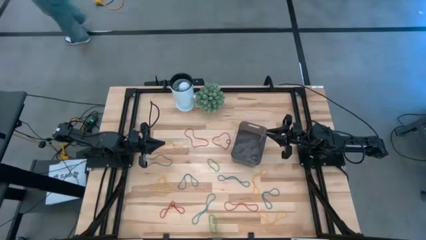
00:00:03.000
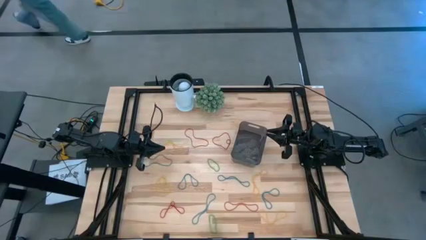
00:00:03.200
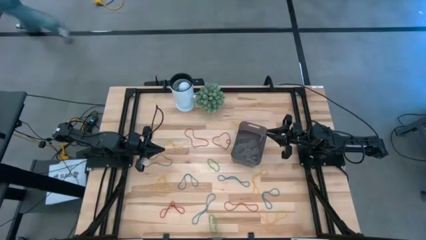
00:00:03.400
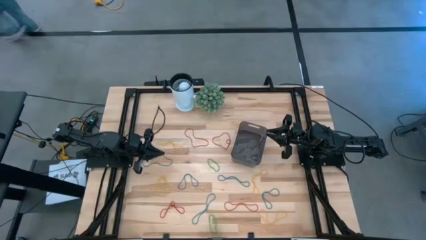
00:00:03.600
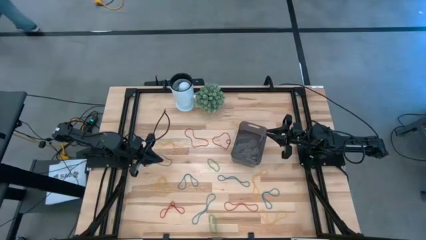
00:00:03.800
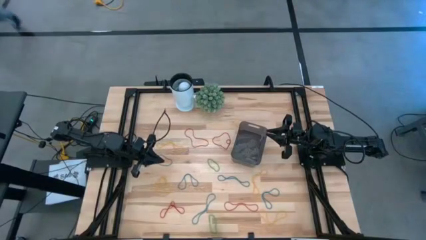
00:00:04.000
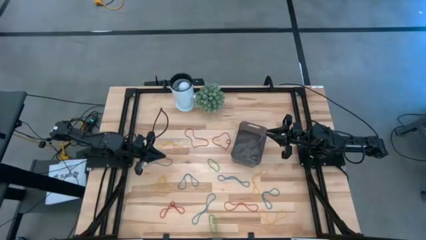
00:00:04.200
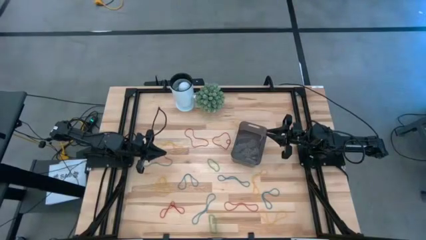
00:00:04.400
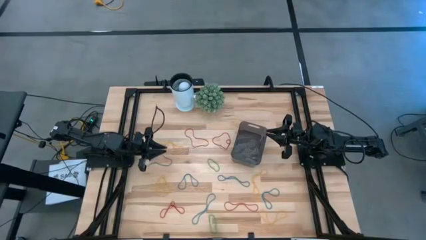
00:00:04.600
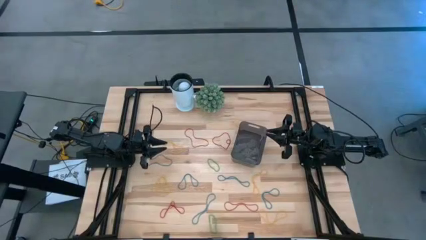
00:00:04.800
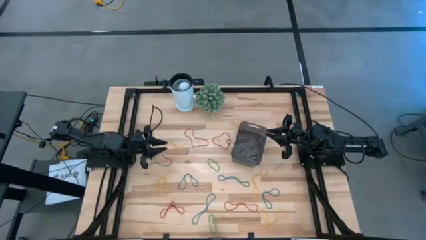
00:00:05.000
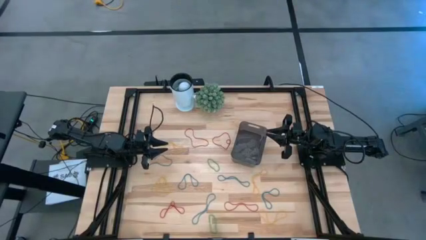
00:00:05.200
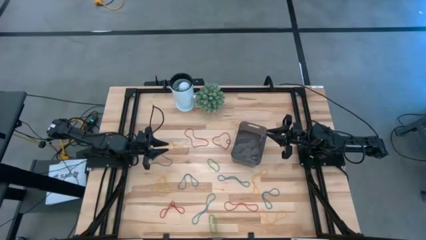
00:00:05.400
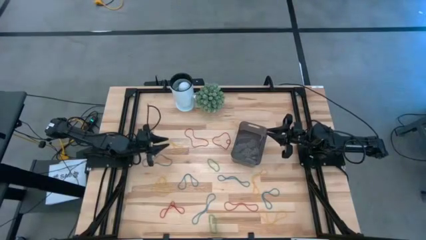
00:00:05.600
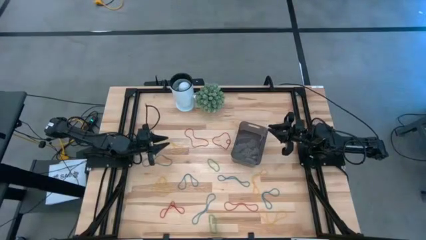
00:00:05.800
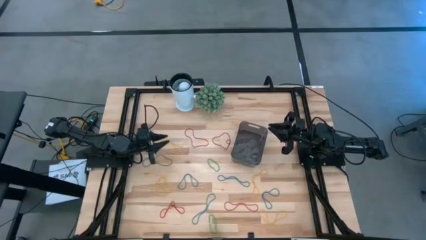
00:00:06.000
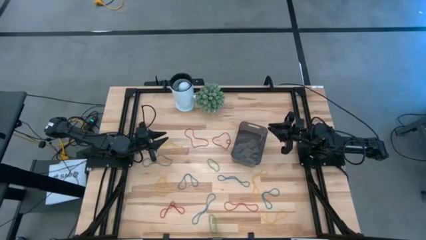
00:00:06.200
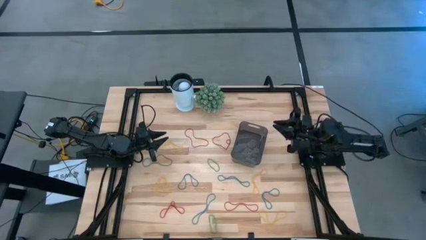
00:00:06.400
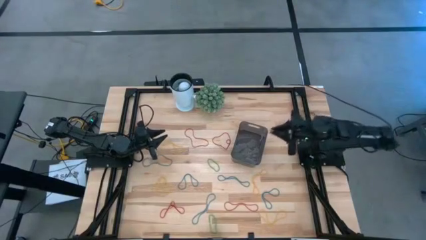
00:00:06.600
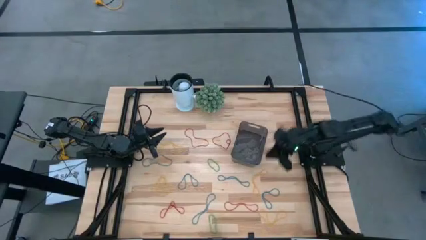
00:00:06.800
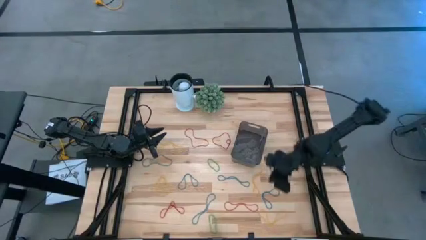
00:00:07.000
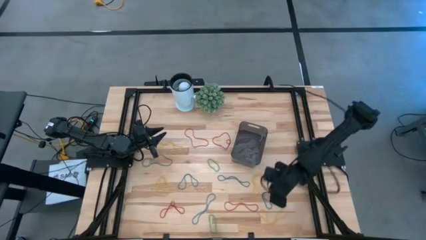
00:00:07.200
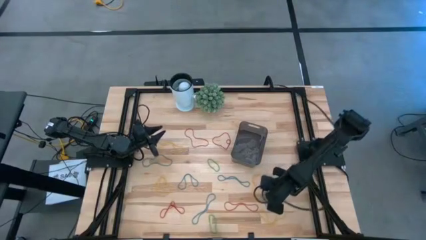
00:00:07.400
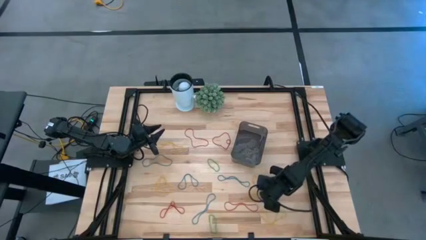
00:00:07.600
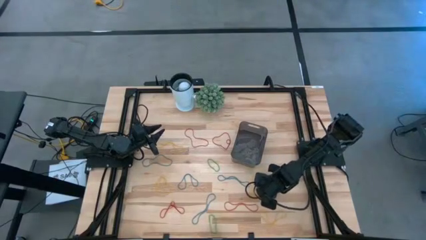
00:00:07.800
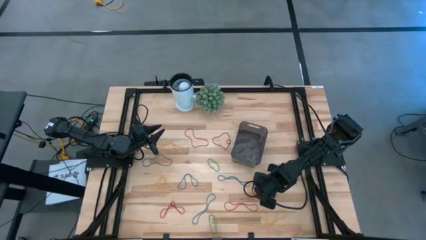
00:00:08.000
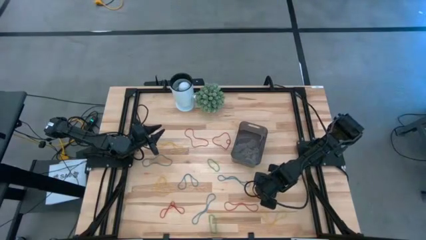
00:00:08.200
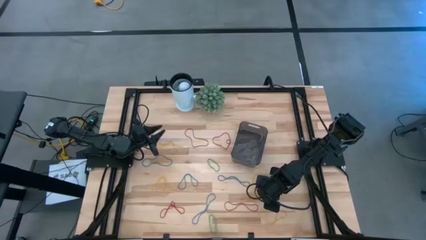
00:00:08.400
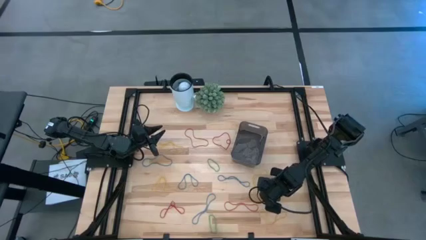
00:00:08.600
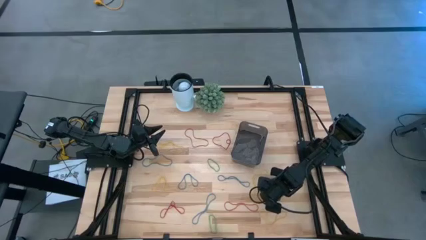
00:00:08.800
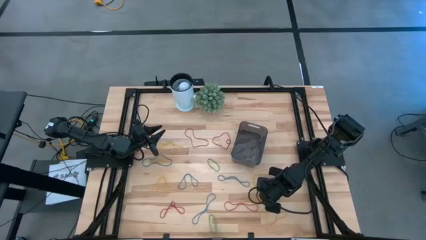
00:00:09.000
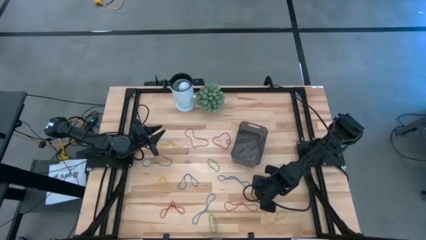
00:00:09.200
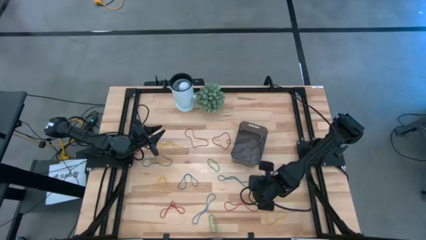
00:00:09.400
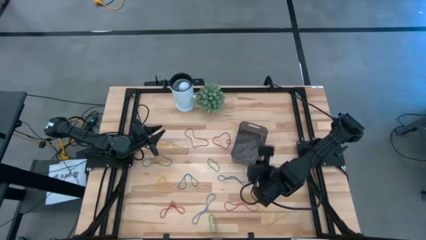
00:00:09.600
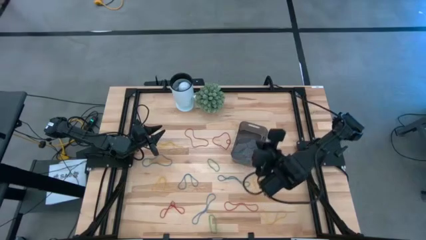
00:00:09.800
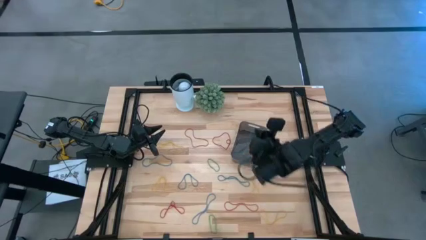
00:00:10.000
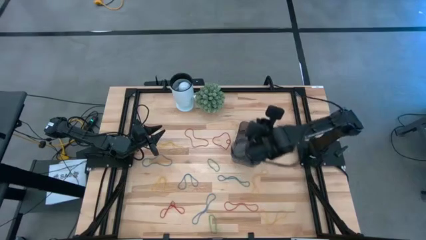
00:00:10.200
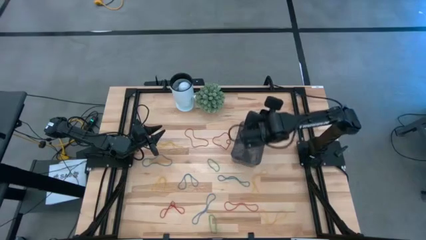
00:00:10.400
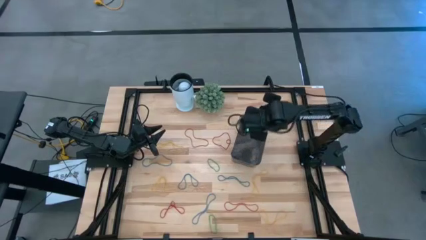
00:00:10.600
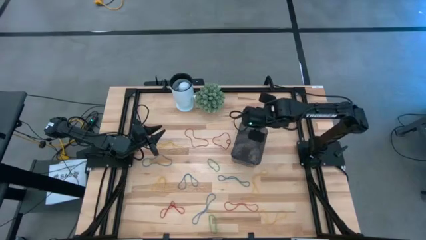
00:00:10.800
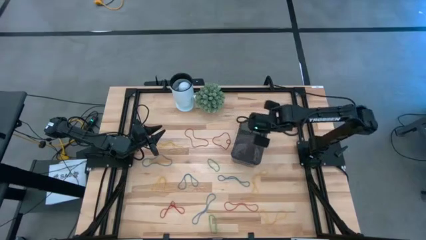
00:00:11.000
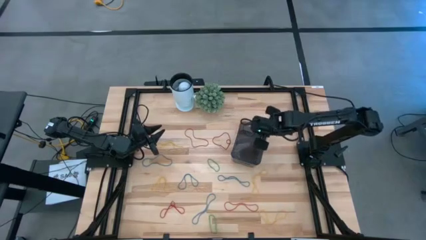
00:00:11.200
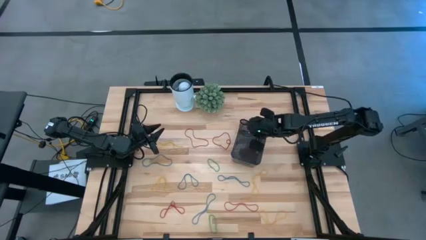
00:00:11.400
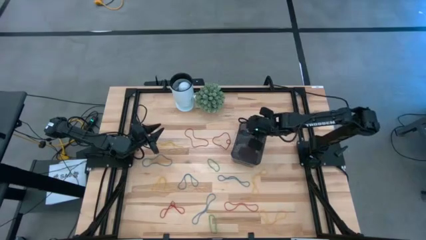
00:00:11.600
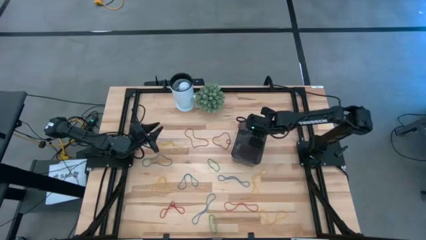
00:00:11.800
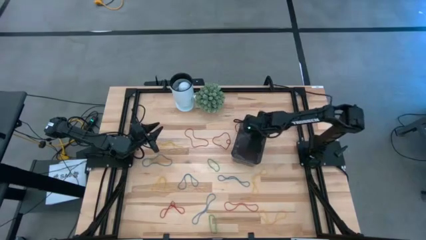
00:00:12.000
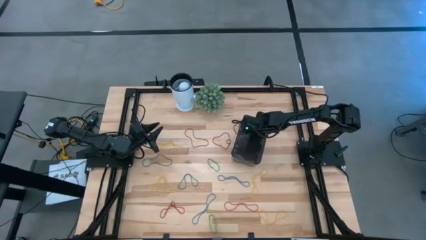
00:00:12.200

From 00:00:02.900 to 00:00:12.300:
Task: Pick and place items into bin
Put the blue rubber band into the black bin

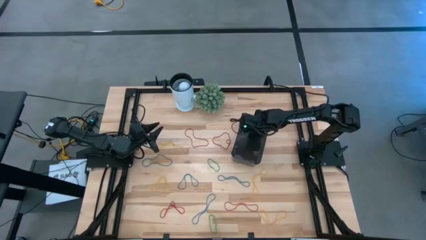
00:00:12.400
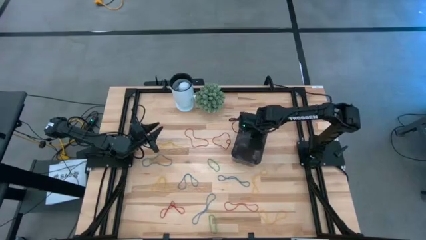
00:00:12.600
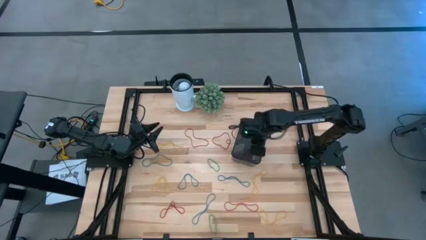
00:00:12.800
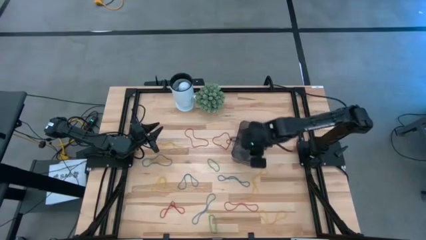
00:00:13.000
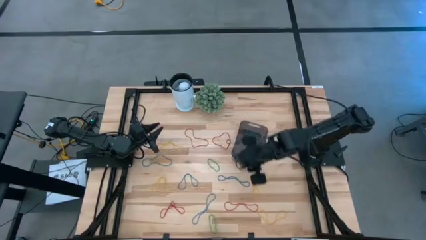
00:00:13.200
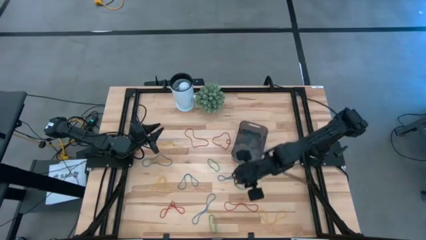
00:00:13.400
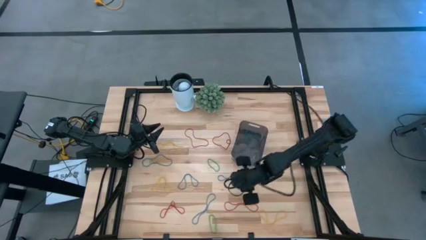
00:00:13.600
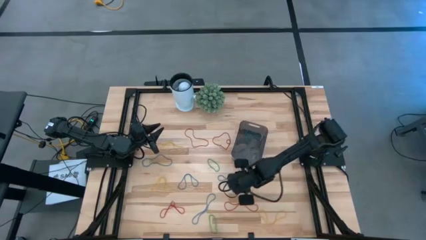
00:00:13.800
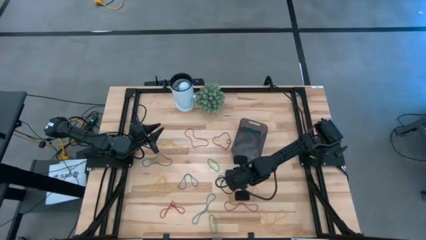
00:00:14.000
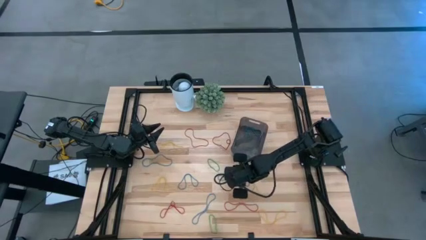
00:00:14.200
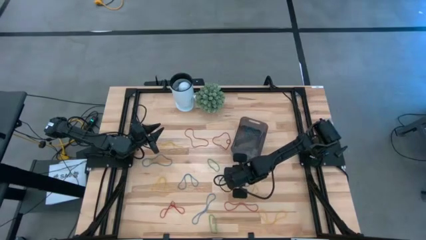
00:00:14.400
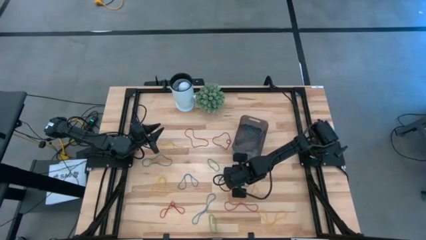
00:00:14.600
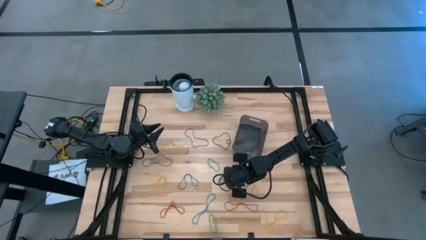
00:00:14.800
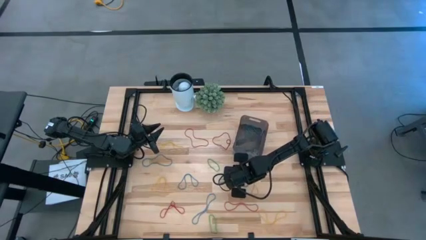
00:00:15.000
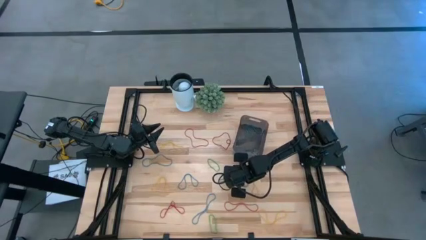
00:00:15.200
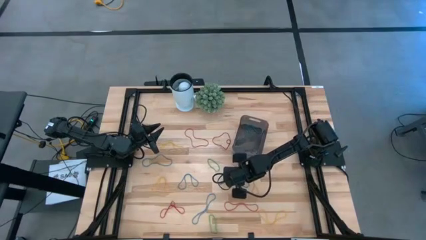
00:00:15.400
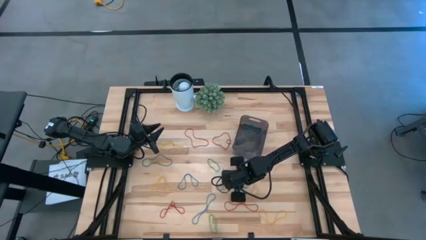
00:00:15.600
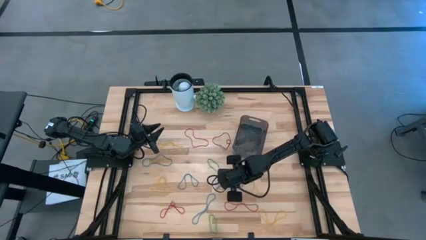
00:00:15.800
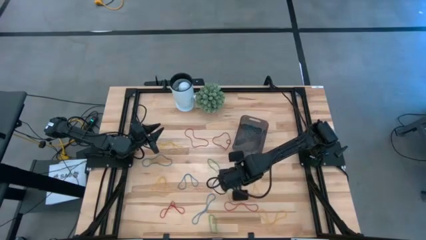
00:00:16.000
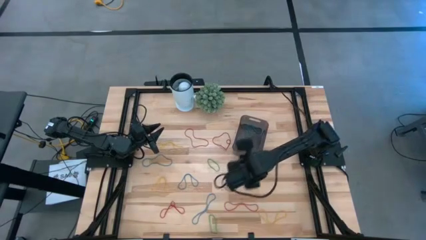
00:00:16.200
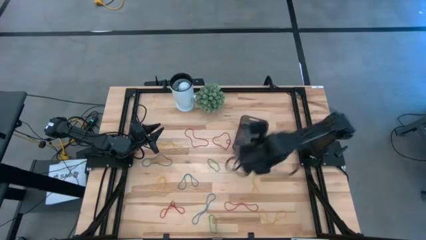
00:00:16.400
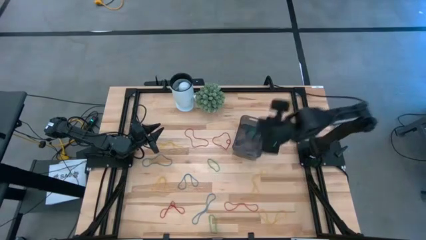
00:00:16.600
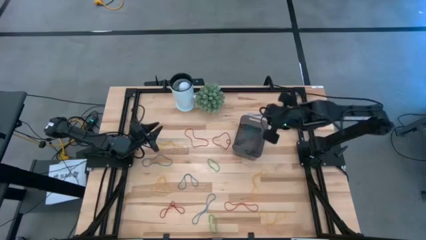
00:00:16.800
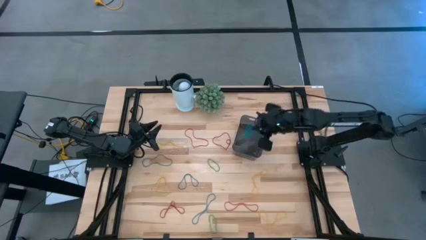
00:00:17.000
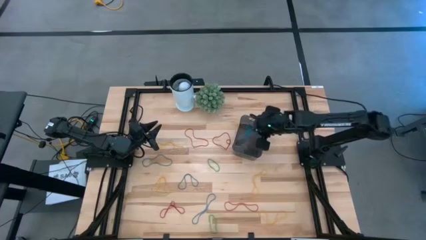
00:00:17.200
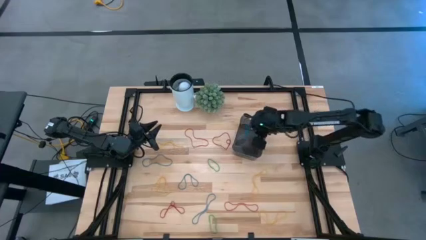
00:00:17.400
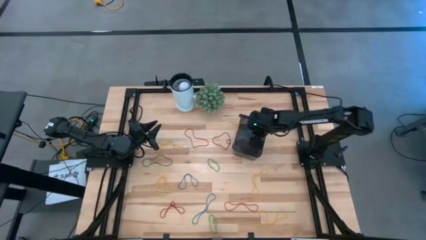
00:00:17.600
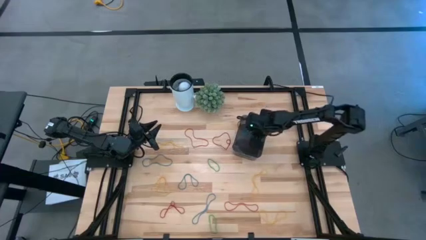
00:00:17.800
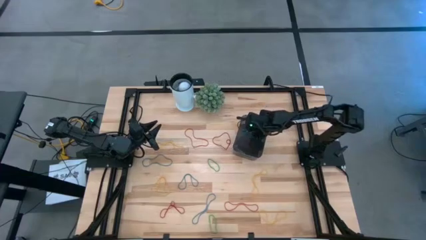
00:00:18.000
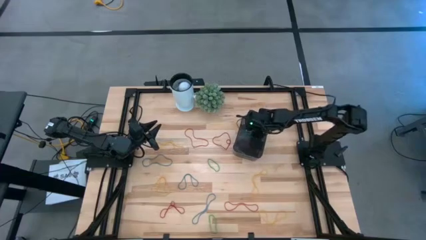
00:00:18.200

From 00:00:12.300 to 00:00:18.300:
Put the blue rubber band into the black bin

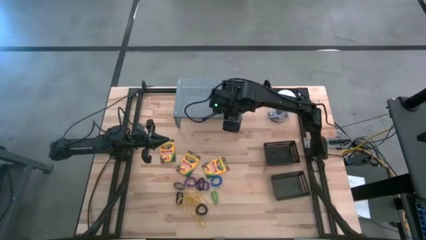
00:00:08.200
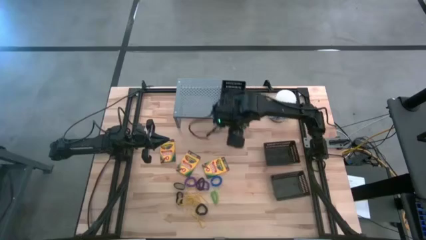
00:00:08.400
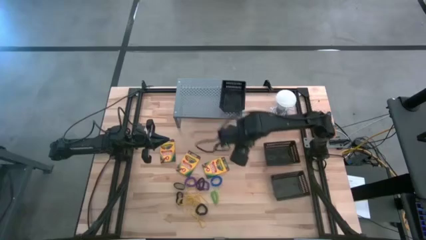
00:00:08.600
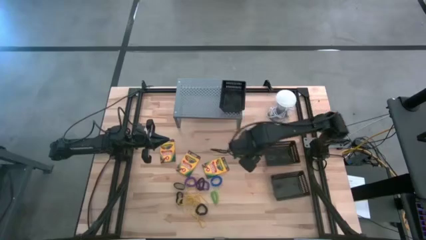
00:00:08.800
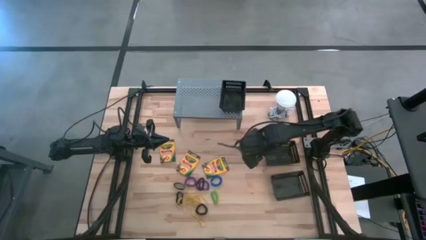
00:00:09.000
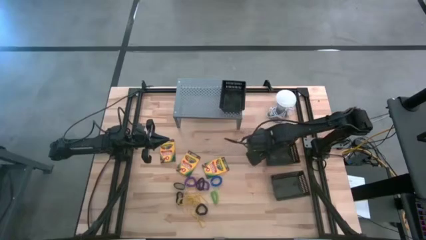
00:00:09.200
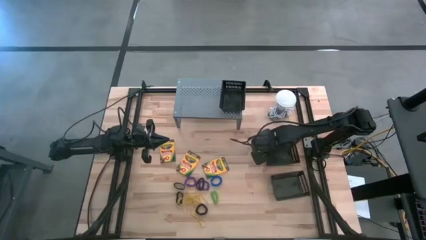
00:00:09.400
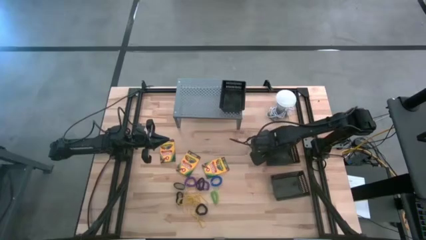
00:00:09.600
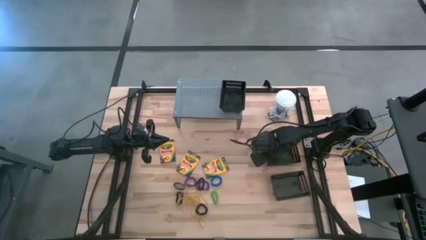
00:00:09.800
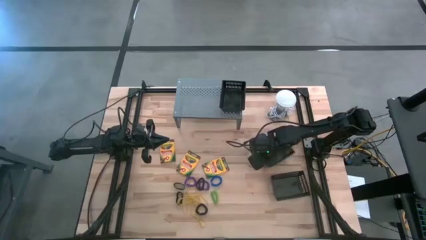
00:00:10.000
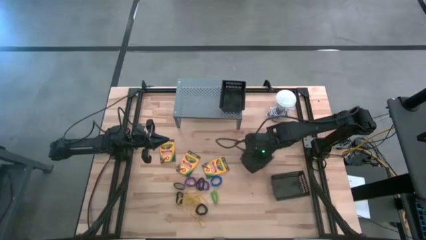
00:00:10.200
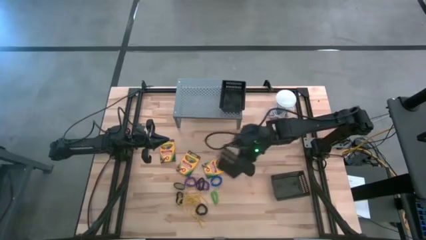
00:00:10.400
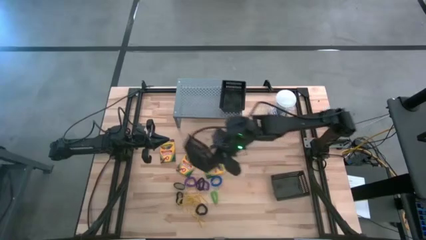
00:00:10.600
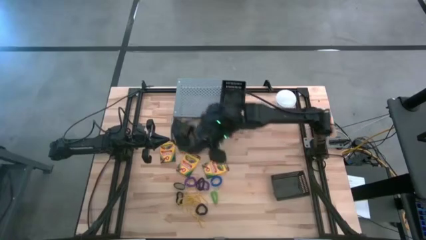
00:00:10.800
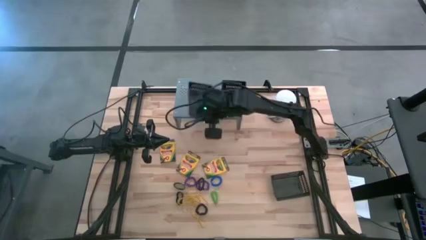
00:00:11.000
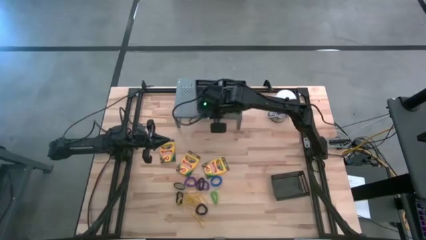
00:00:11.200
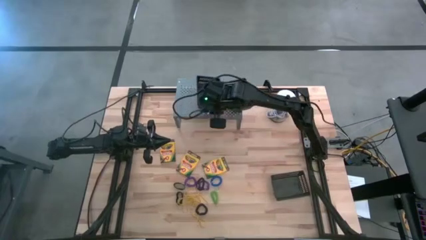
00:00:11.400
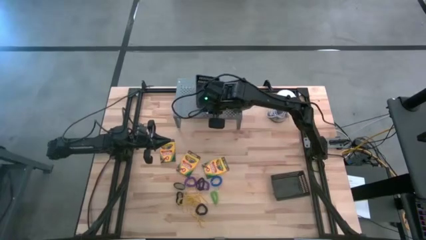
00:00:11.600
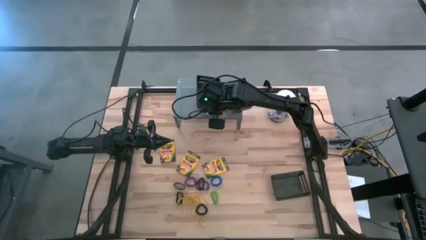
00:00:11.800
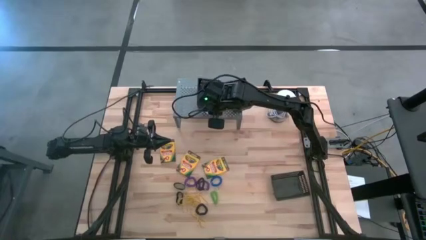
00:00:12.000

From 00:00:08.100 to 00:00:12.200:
Task: Pick & Place Office Desk Supplies
Put the top black bin on the shelf
